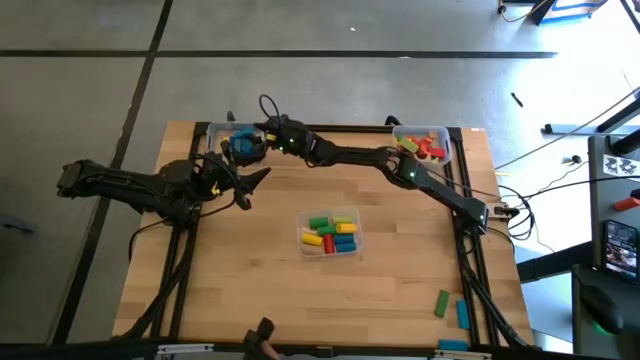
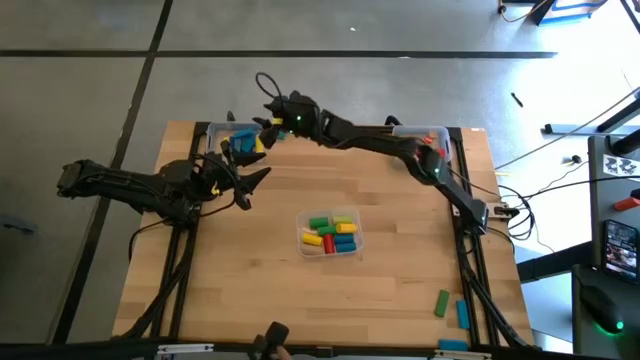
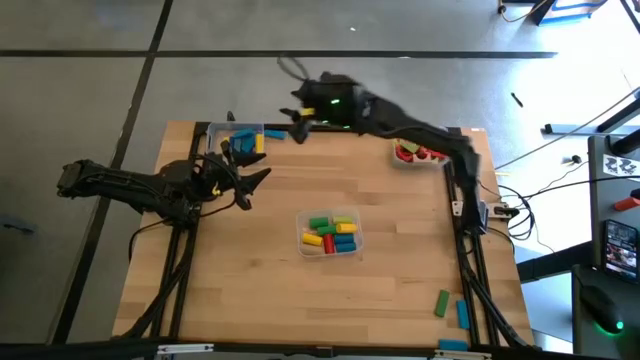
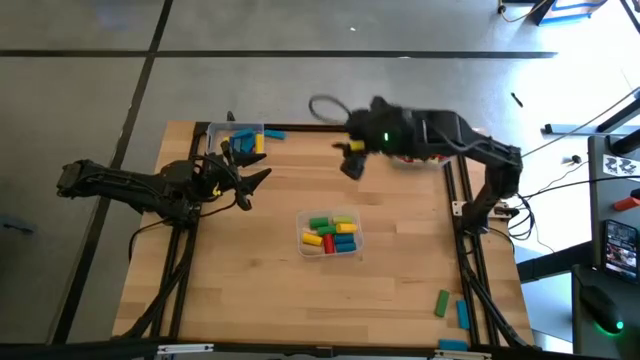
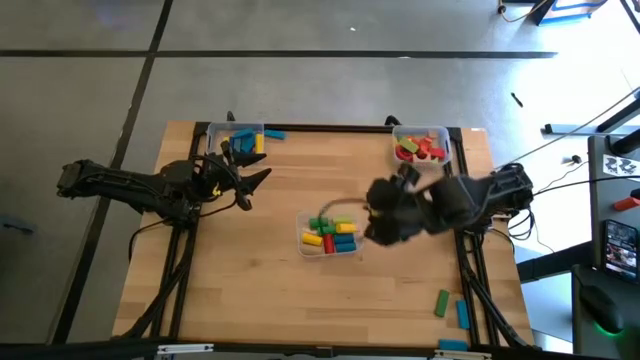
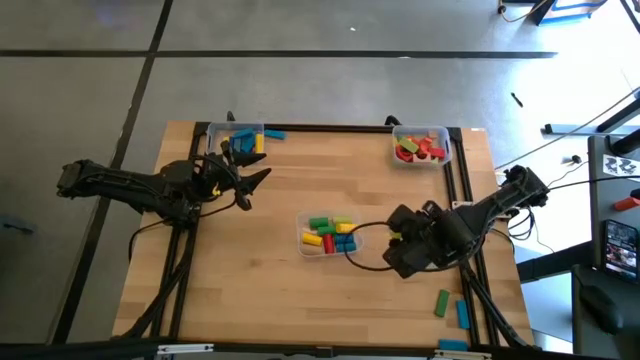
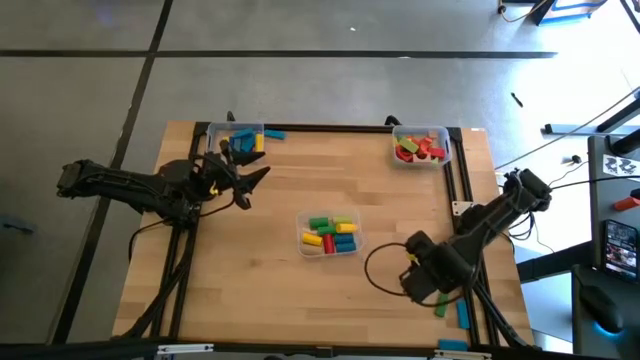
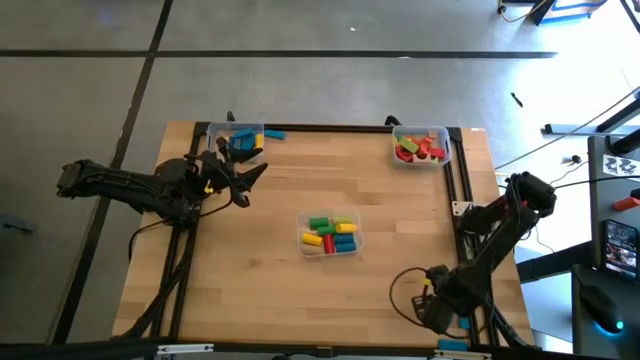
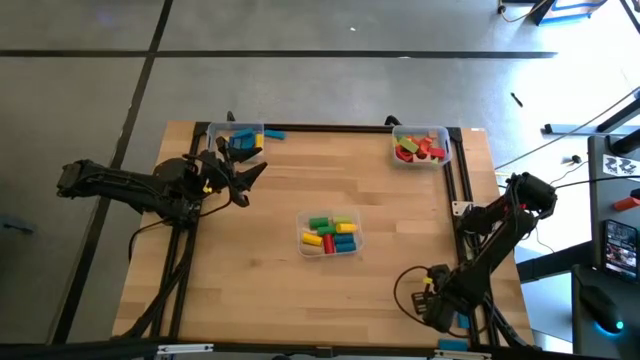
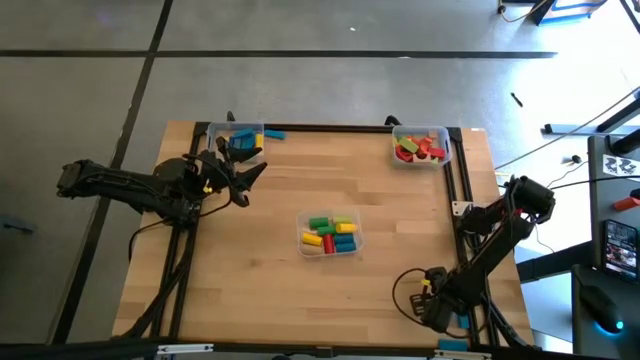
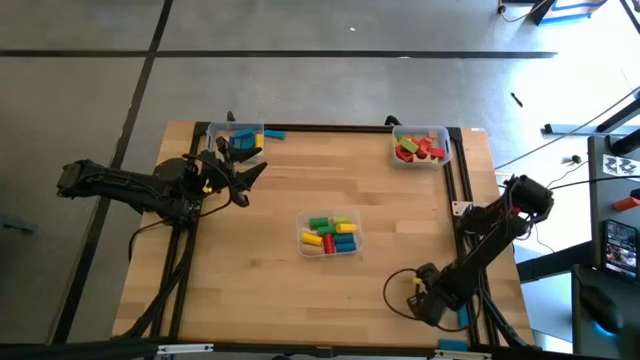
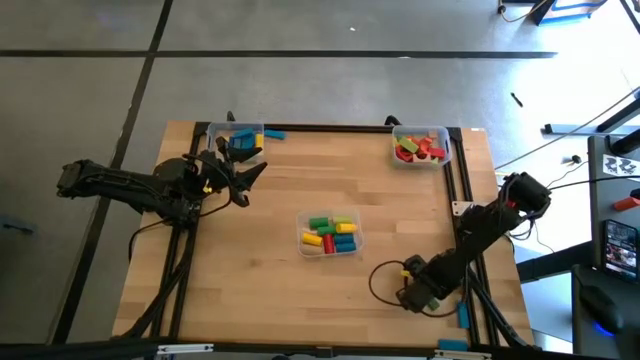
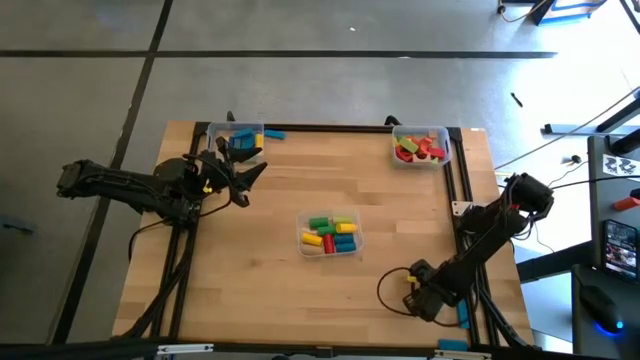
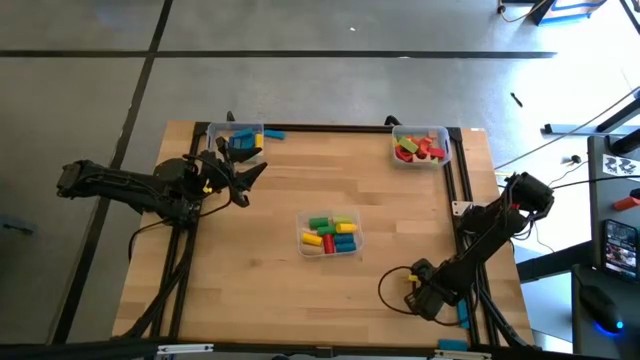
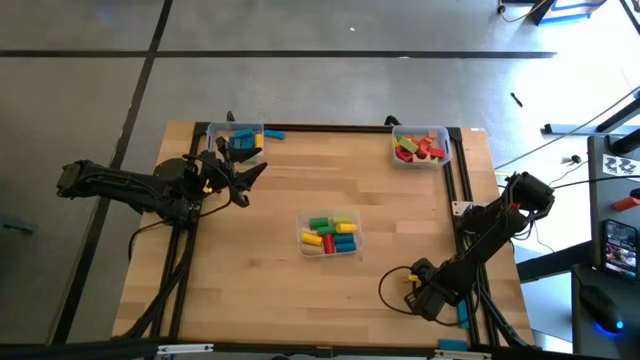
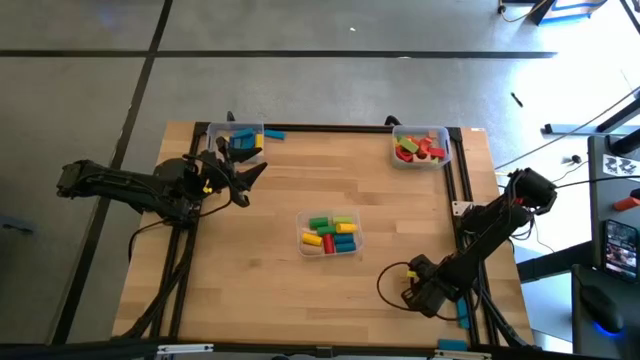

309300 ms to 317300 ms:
Task: Sort blocks by size
Put the green rectangular block into the top left transparent bin

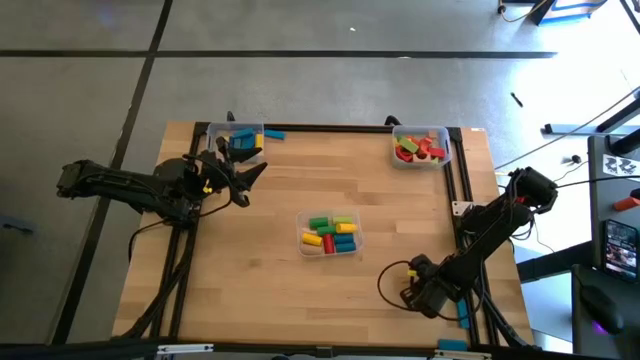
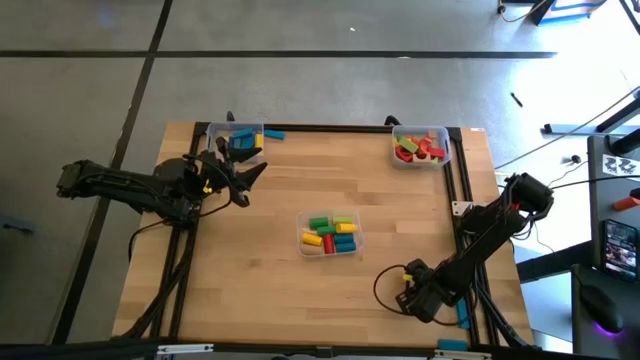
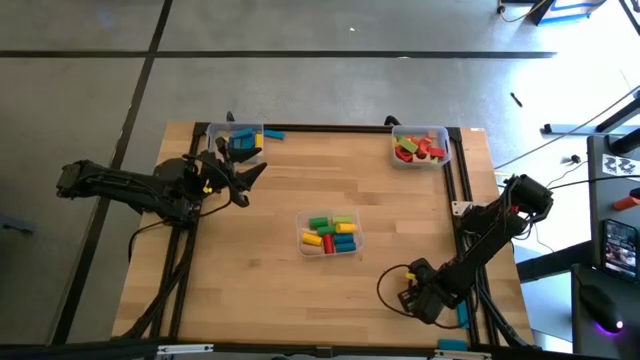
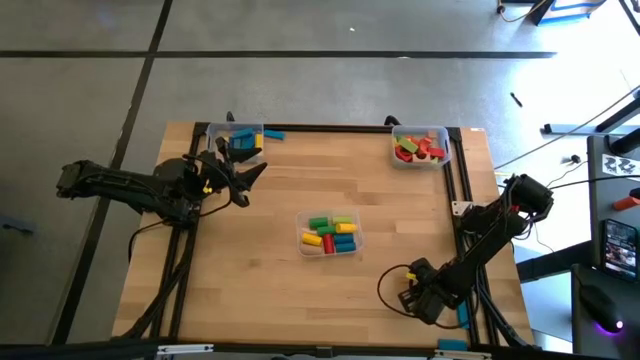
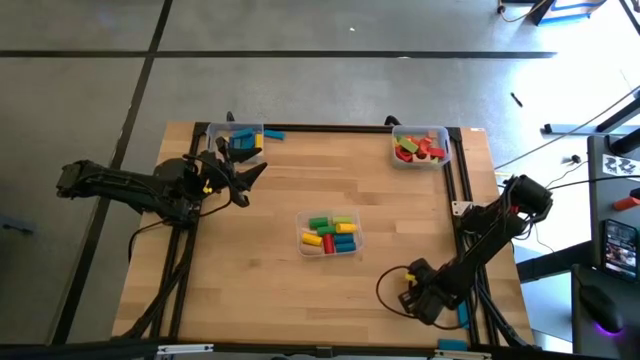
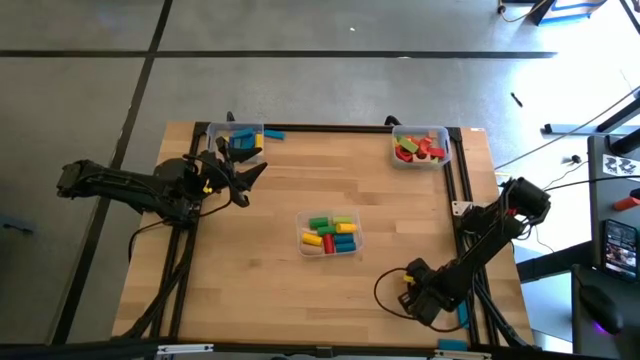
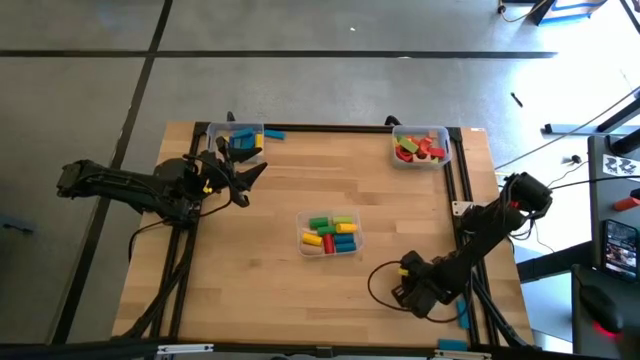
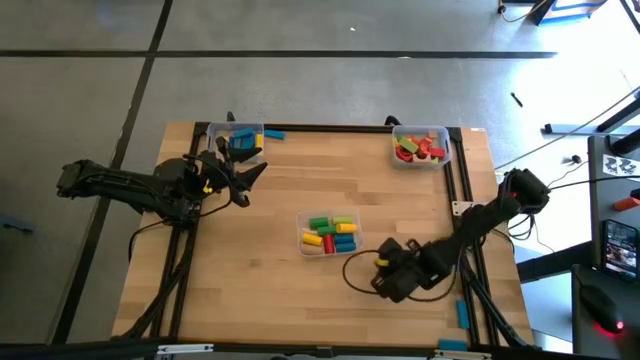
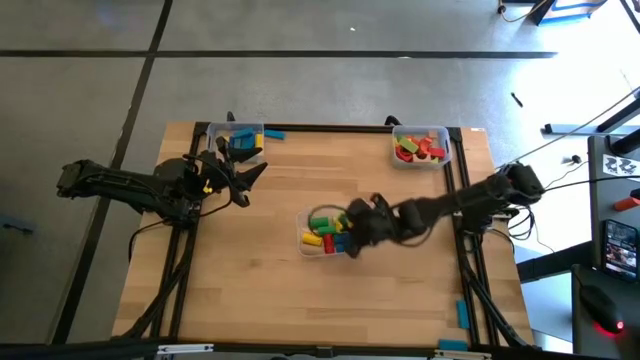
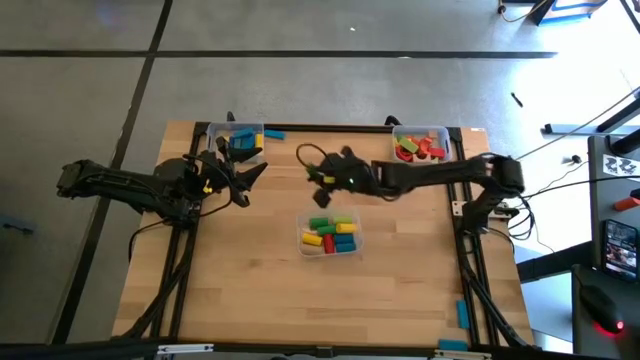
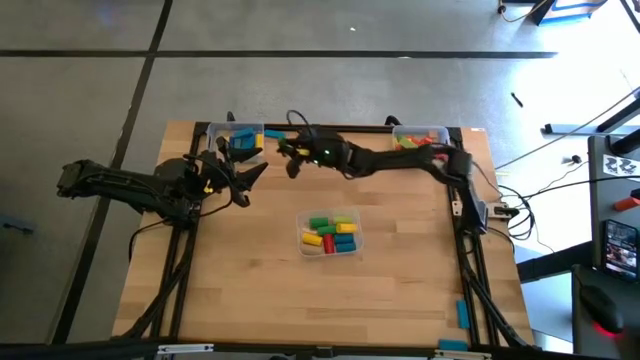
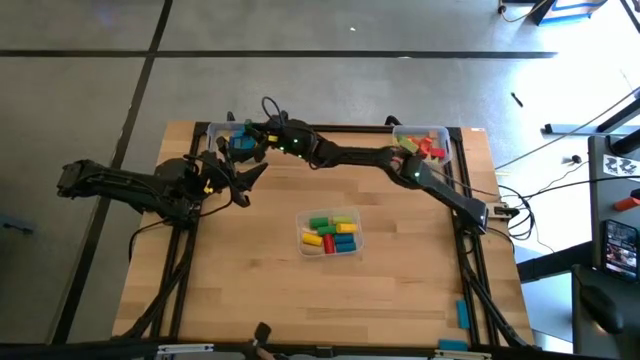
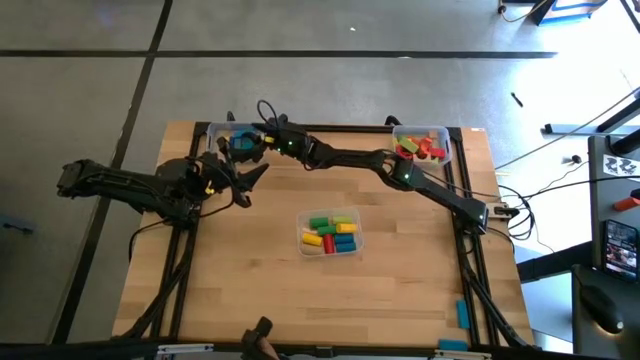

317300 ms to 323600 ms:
Put the green rectangular block into the top left transparent bin

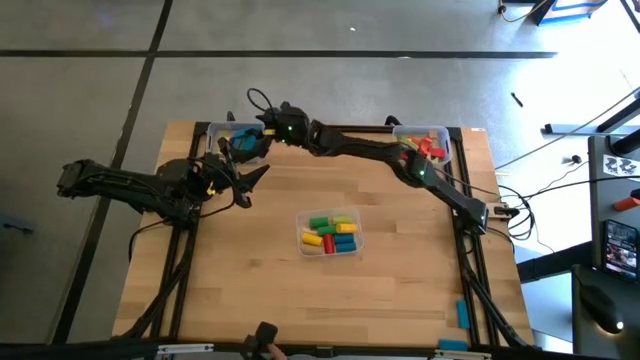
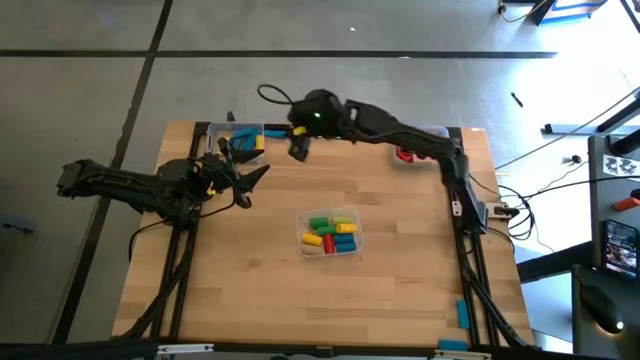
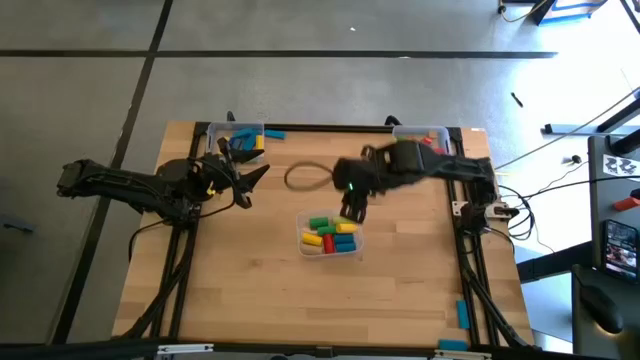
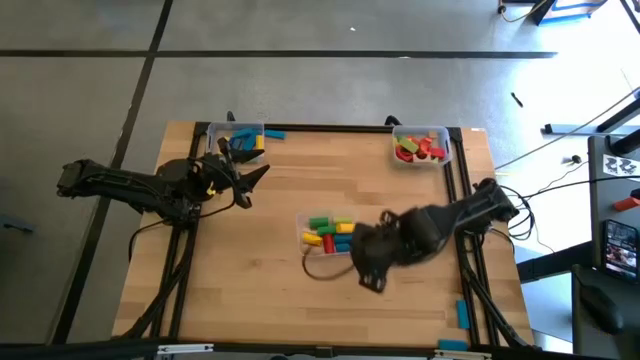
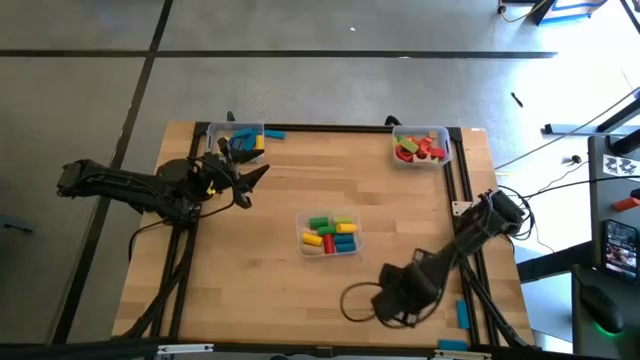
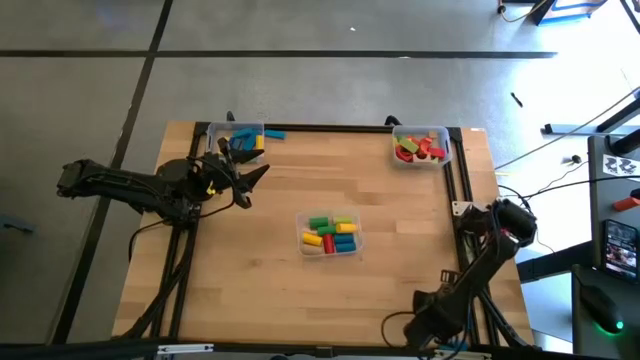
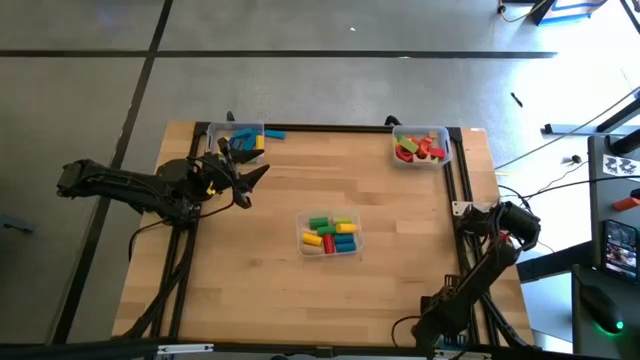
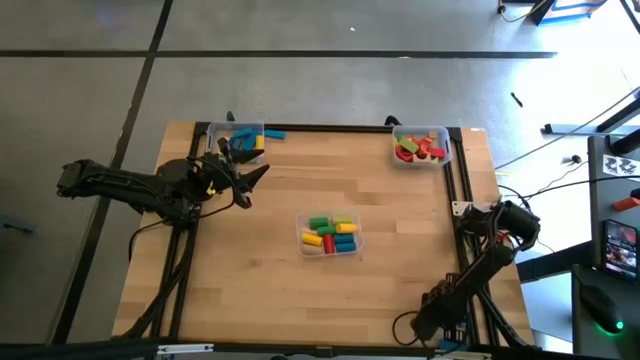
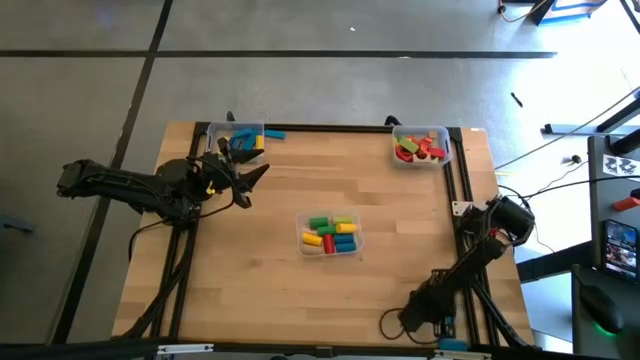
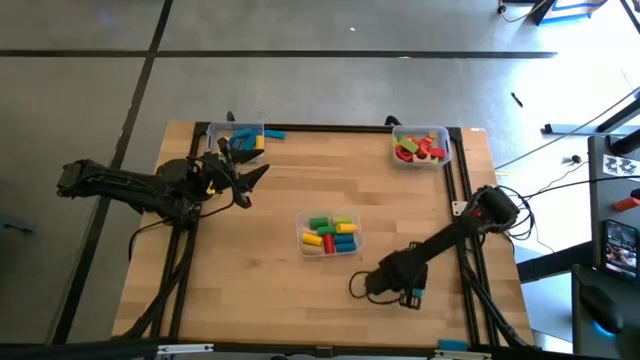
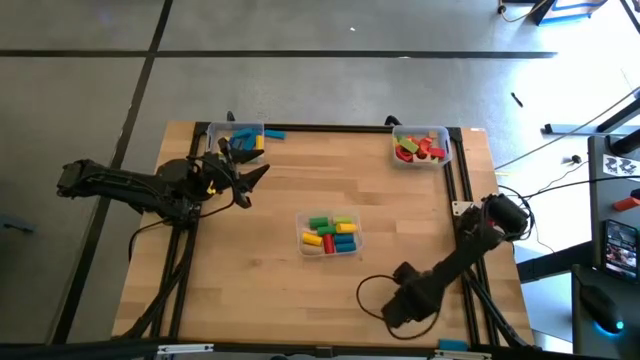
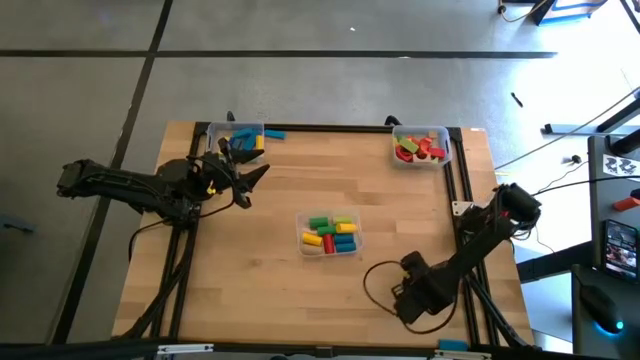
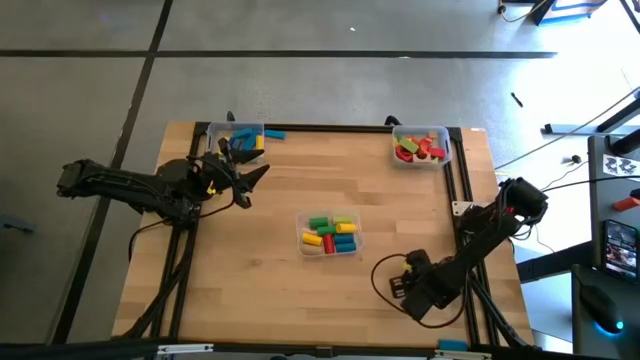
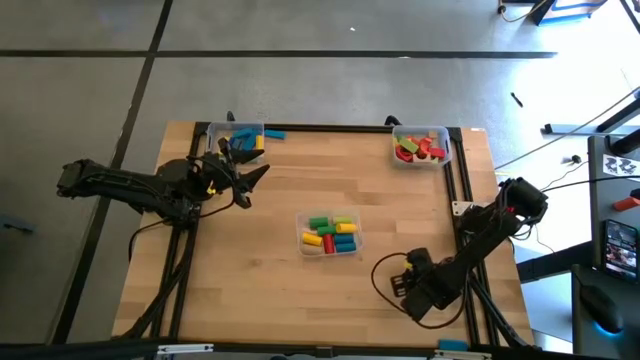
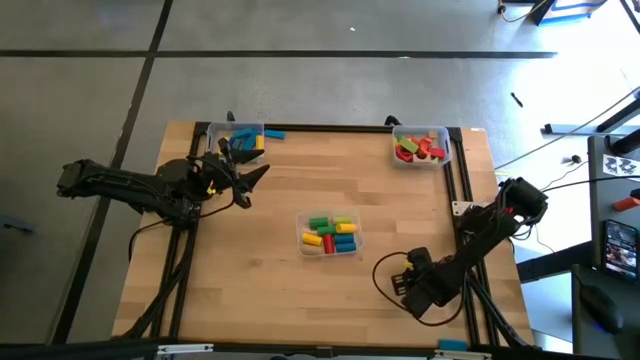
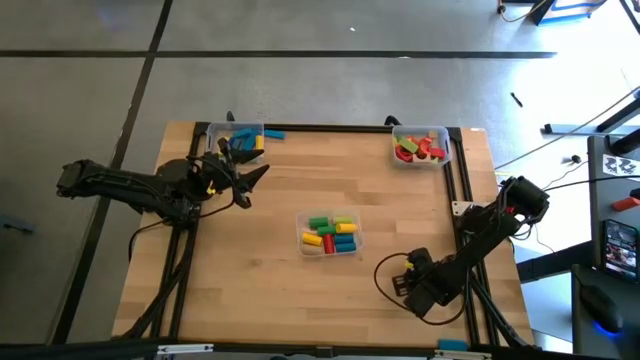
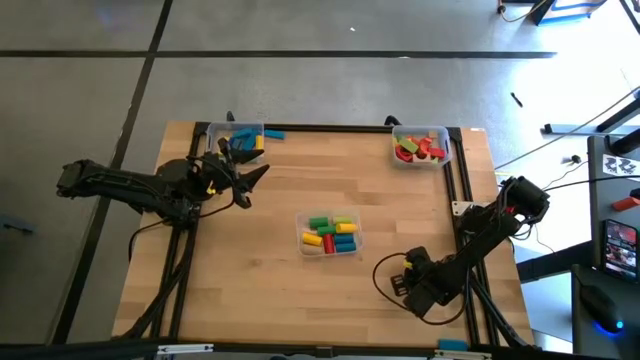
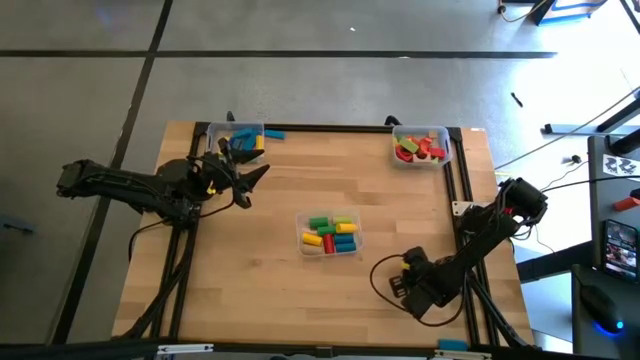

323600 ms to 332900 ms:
Put the blue rectangular block into the top left transparent bin
